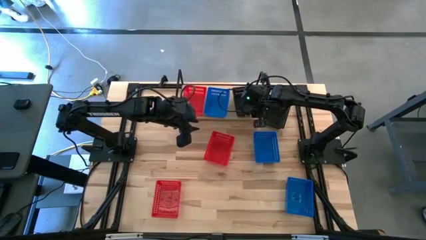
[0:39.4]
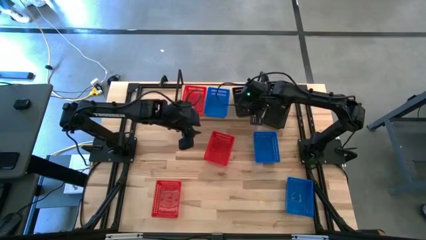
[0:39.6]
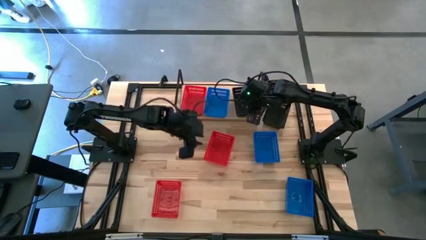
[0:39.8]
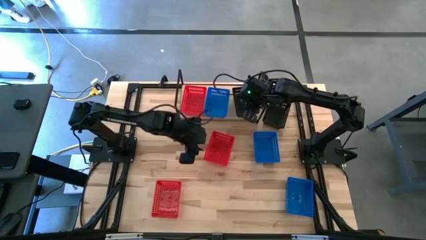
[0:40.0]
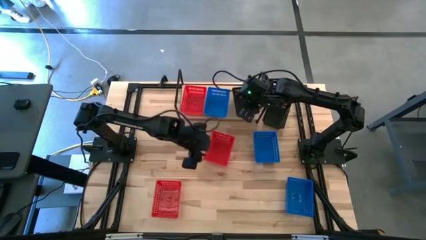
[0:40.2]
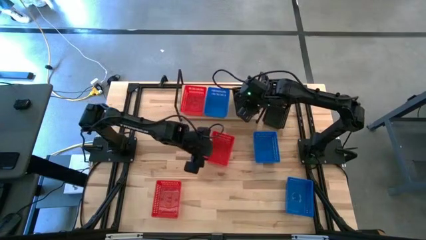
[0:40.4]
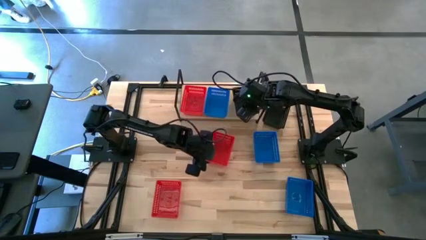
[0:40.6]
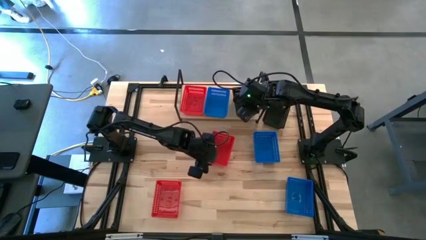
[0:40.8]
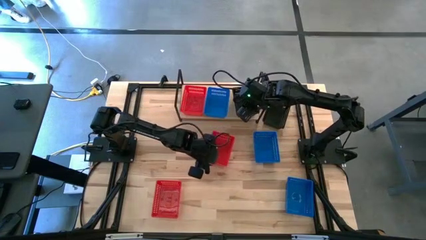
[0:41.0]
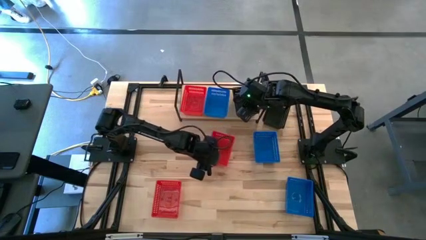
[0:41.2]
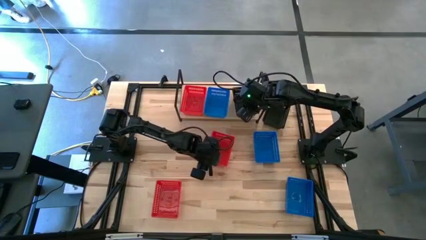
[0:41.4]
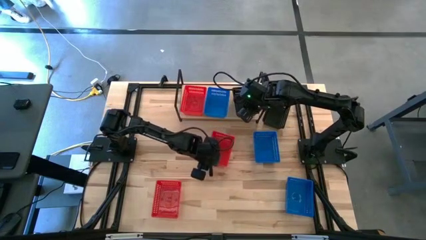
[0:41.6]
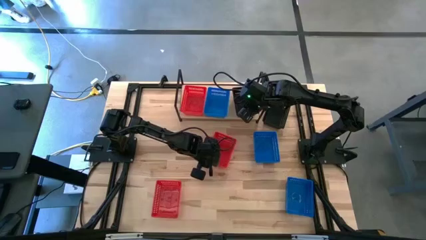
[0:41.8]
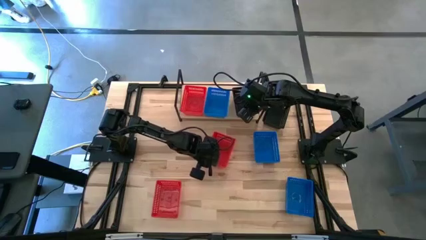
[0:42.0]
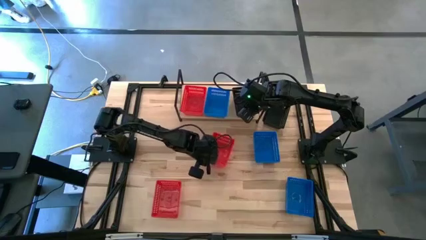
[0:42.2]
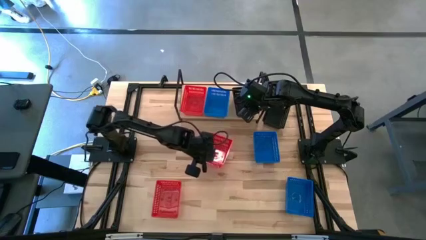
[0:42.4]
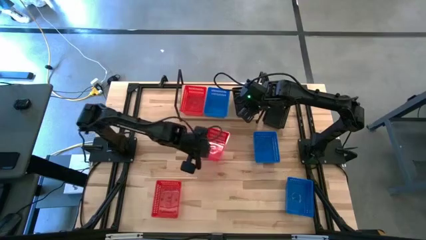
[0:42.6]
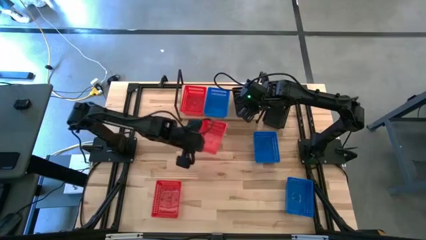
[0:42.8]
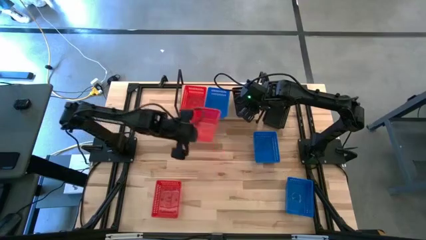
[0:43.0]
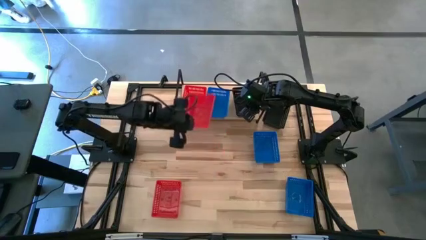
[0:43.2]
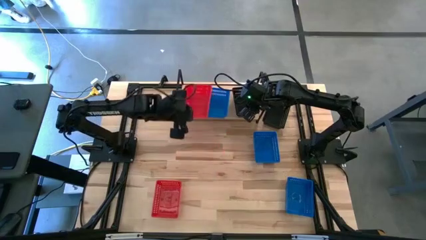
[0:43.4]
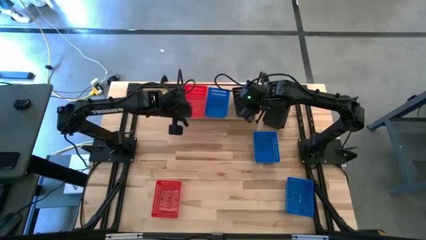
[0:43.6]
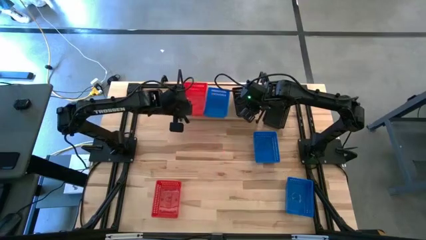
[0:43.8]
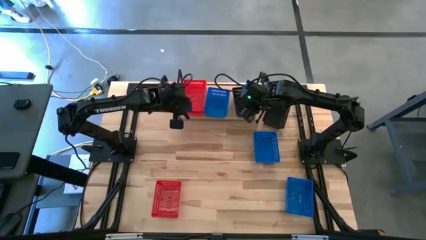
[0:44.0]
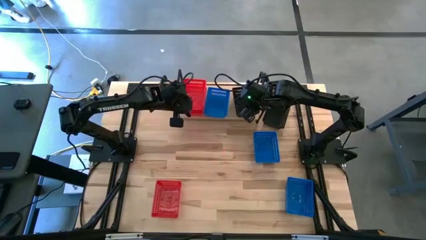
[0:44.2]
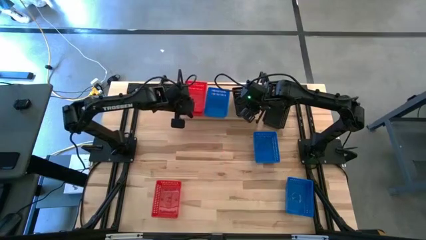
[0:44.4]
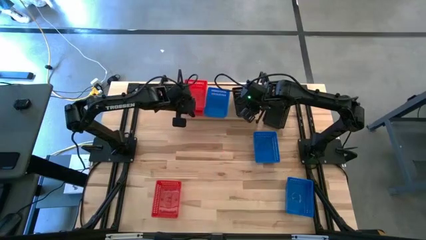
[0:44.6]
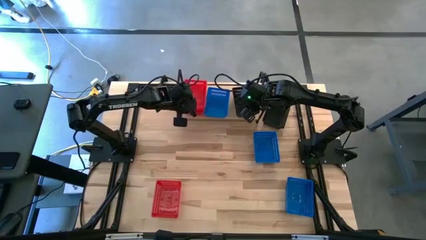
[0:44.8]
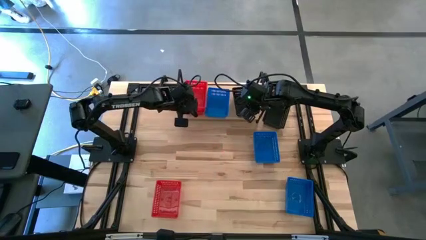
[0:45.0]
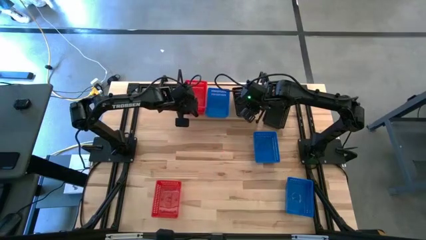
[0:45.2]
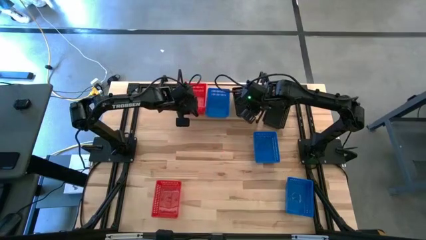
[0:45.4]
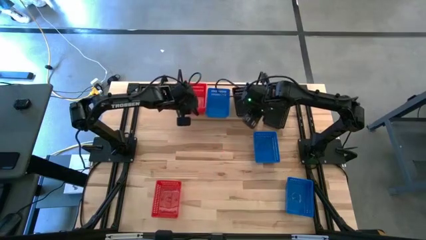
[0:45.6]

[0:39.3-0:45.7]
Task: Stack baskets on shelf by color
Stack the top red bin on top of the red bin on the shelf

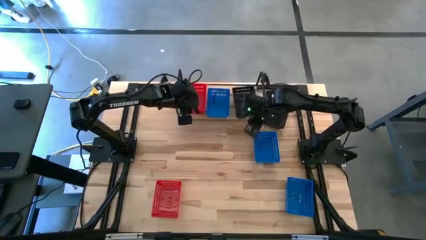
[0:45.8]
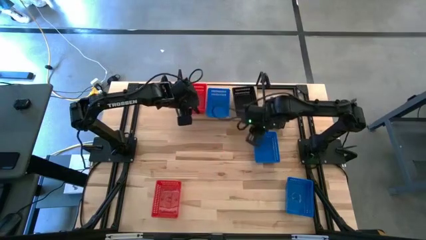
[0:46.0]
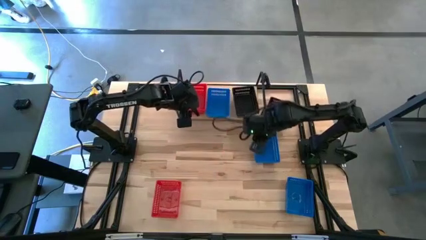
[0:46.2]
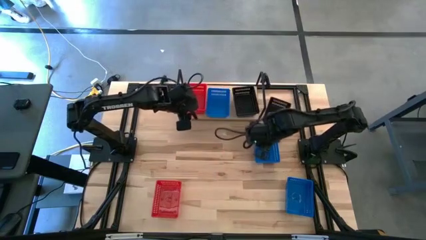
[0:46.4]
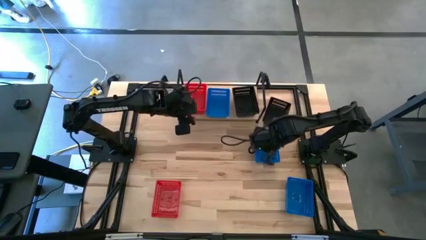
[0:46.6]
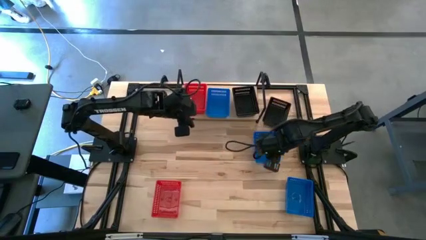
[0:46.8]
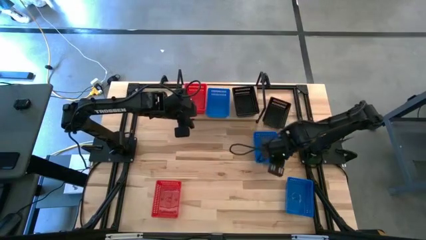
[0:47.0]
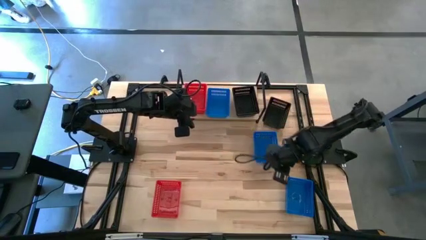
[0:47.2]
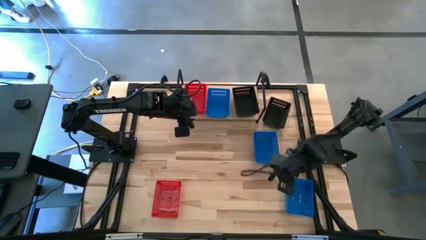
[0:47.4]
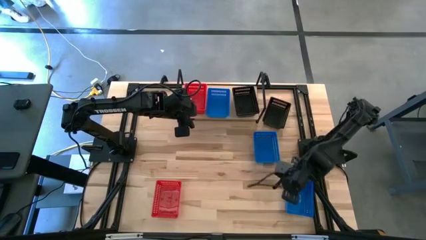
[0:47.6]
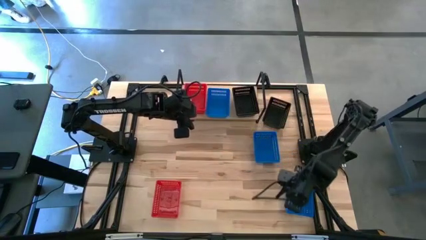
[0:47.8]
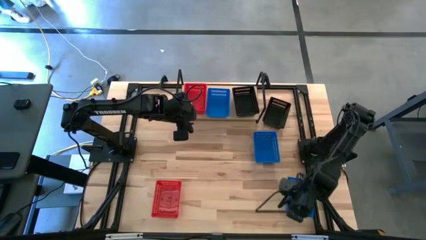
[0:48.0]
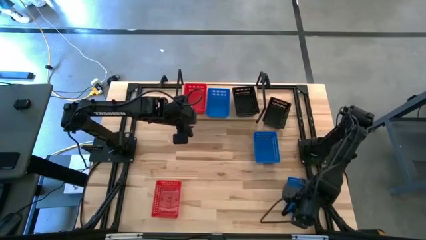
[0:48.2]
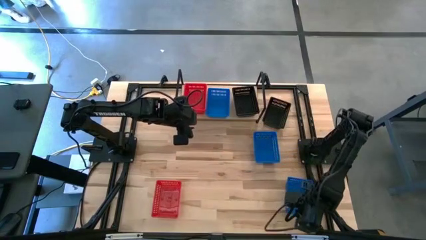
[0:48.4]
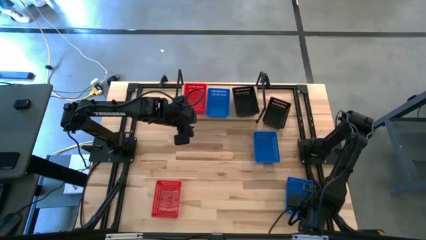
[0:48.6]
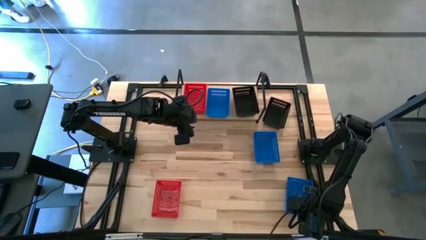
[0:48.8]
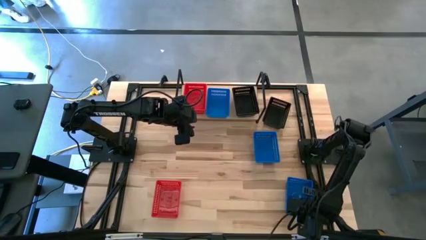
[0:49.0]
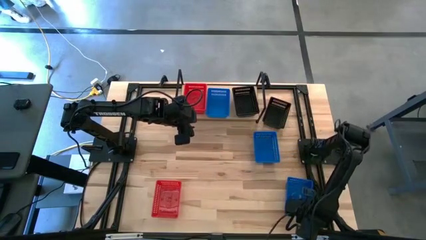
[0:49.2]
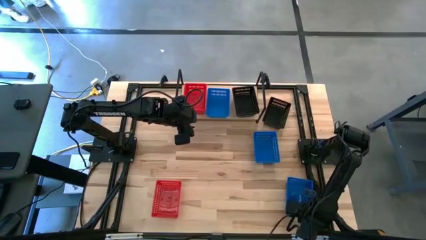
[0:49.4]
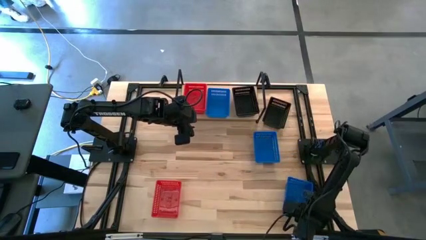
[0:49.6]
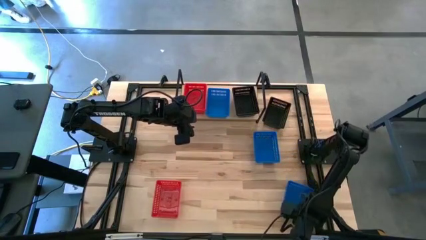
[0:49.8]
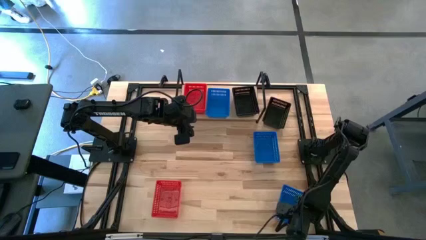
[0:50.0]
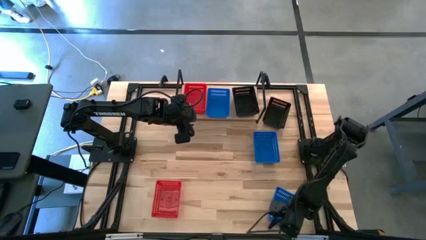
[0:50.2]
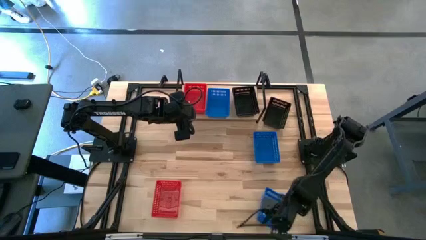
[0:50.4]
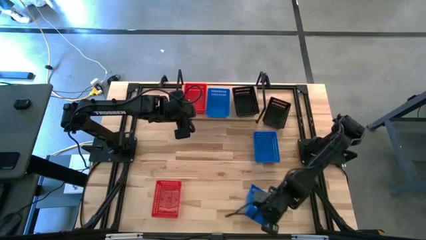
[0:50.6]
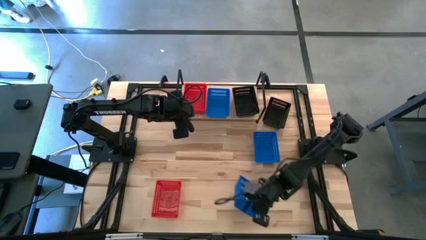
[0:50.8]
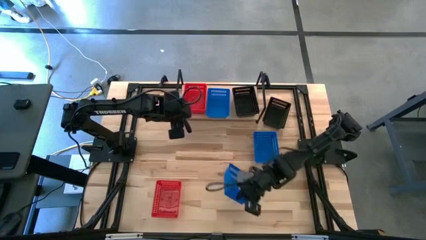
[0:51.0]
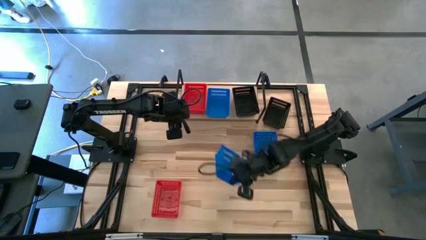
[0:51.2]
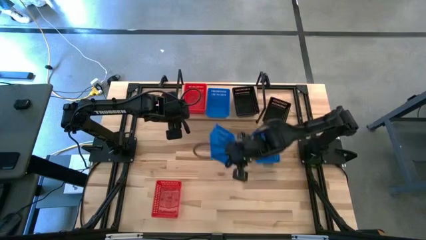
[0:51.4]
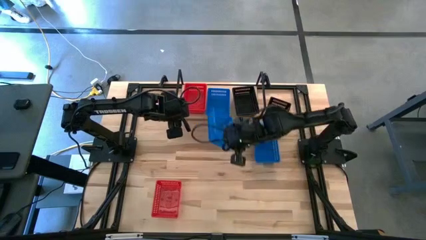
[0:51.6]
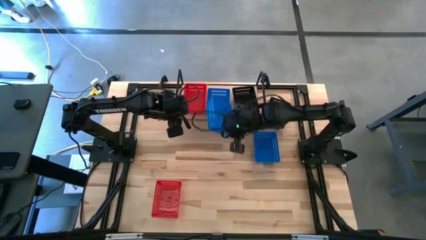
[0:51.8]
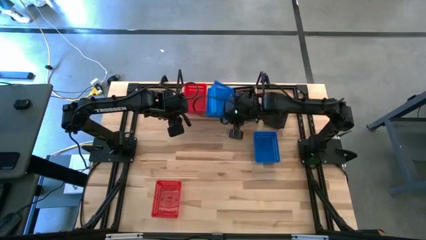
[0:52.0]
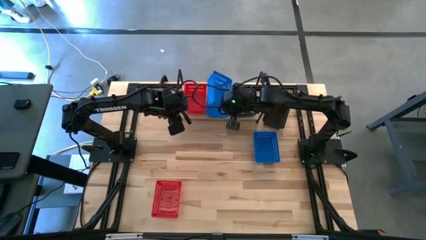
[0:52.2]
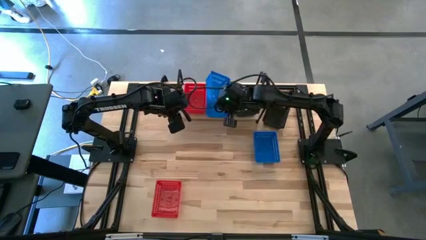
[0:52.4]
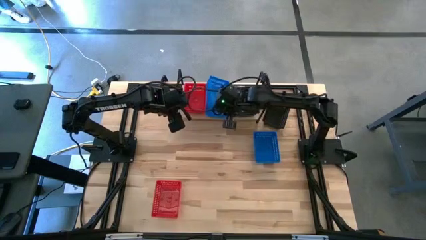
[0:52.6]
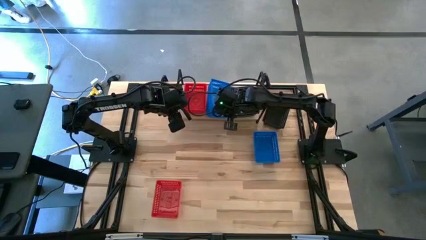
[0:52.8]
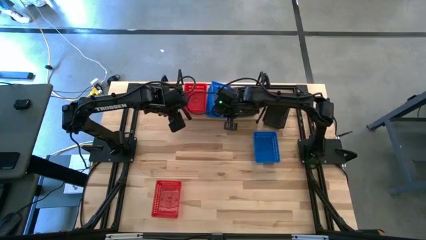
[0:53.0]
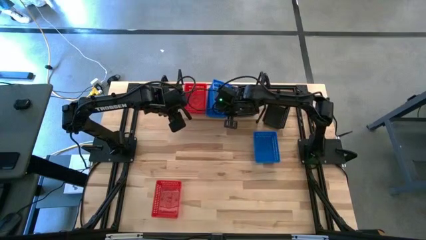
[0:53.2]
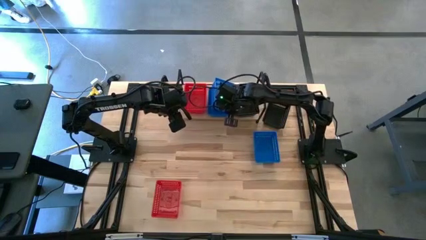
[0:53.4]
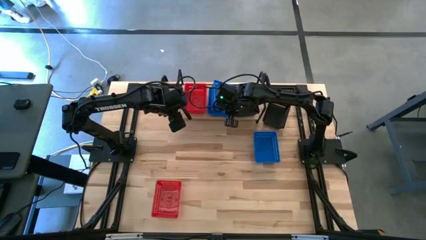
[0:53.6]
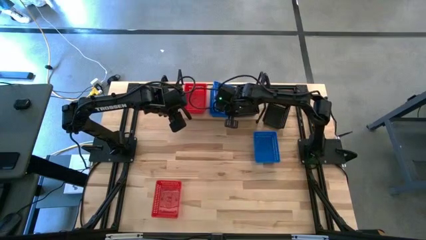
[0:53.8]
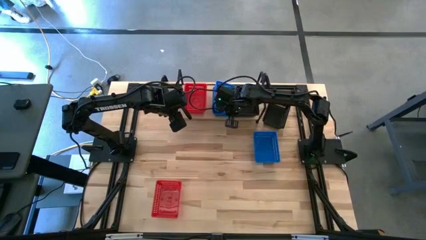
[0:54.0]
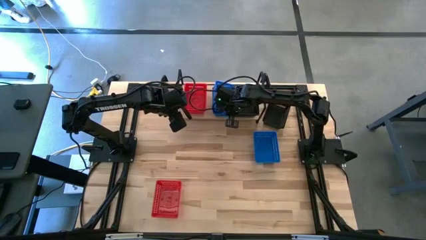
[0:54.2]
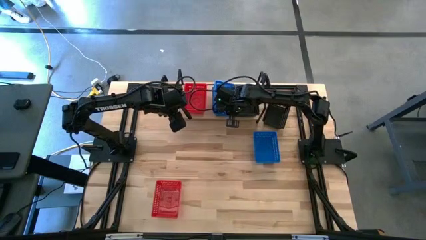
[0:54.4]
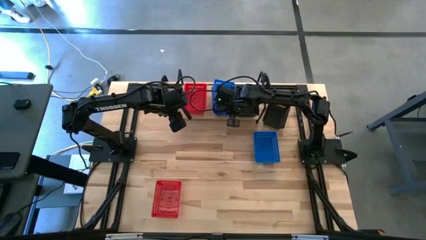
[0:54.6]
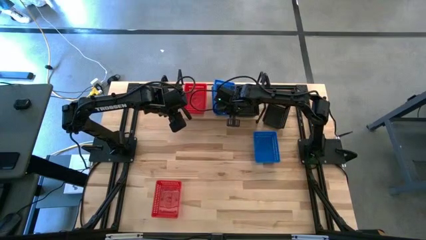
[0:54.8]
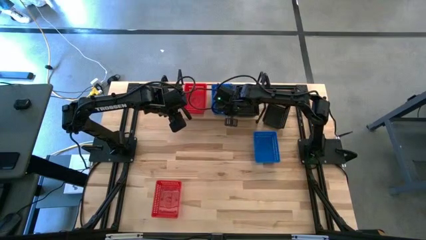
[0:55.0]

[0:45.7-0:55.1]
Stack the bottom blue bin on top of the blue bin on the shelf
